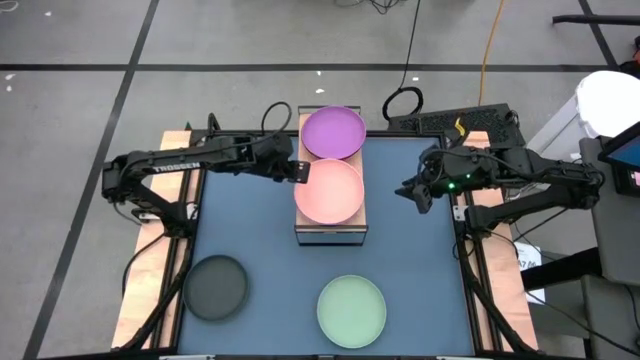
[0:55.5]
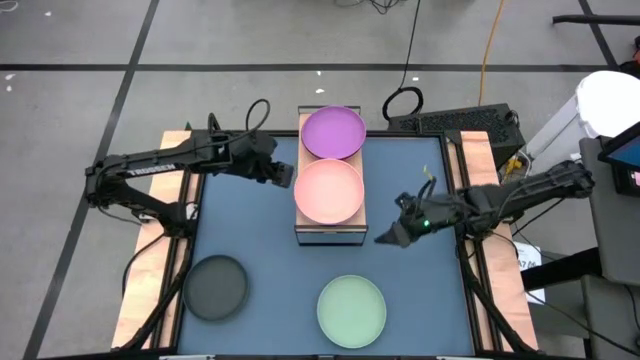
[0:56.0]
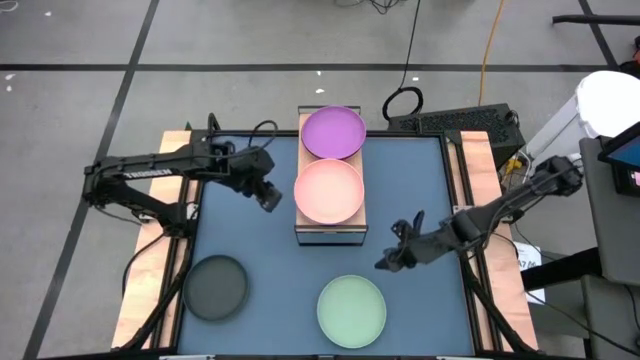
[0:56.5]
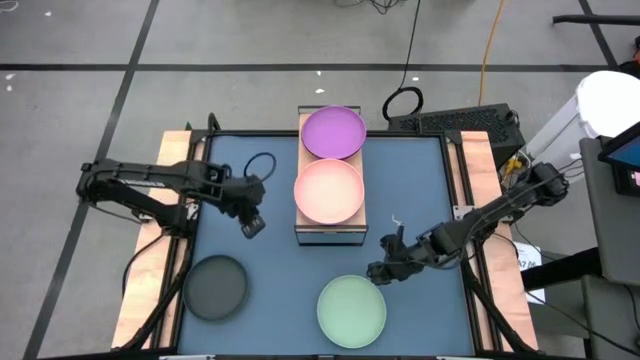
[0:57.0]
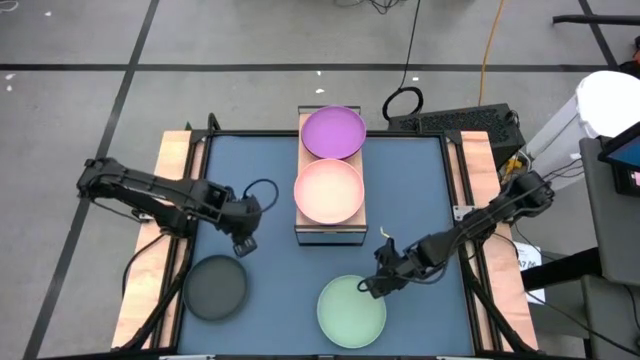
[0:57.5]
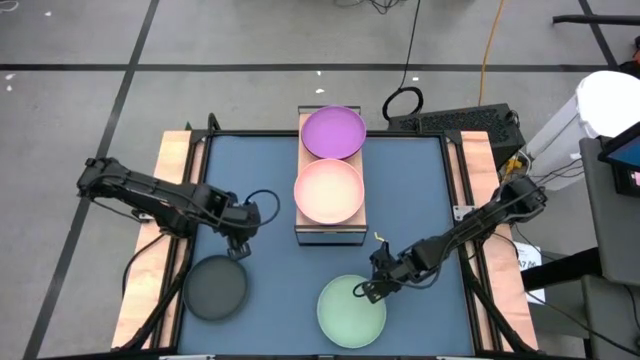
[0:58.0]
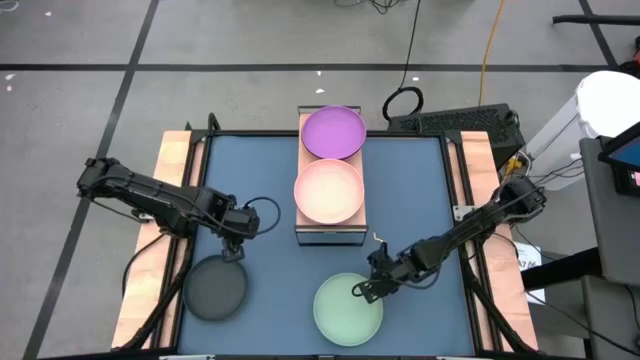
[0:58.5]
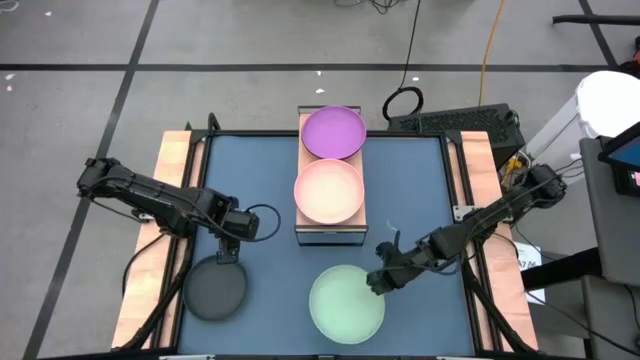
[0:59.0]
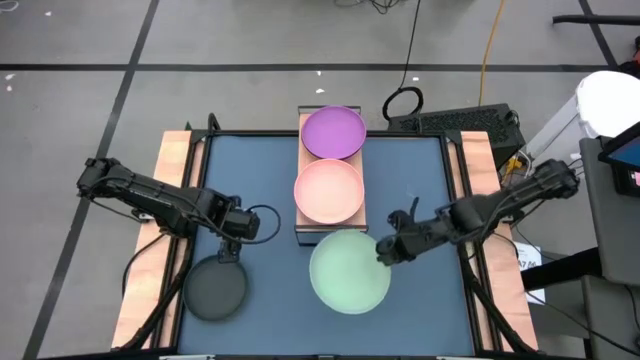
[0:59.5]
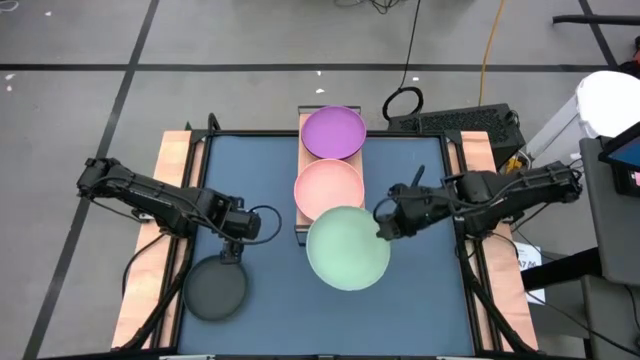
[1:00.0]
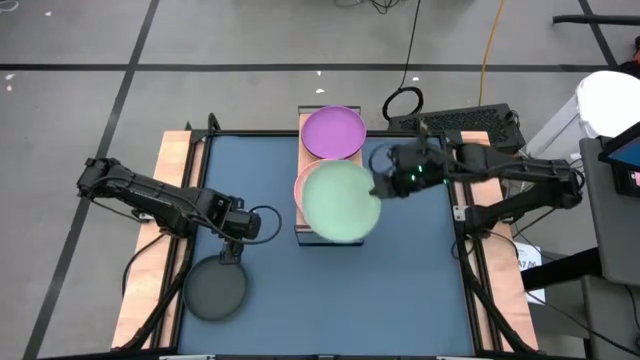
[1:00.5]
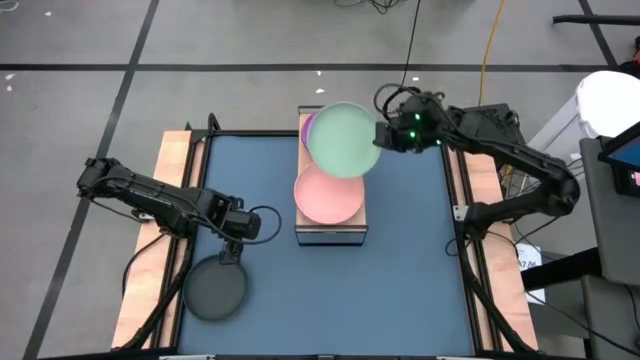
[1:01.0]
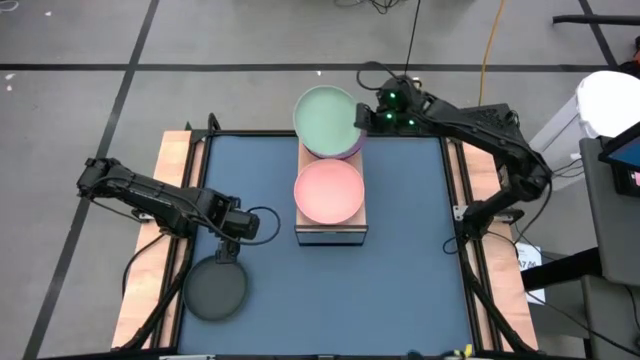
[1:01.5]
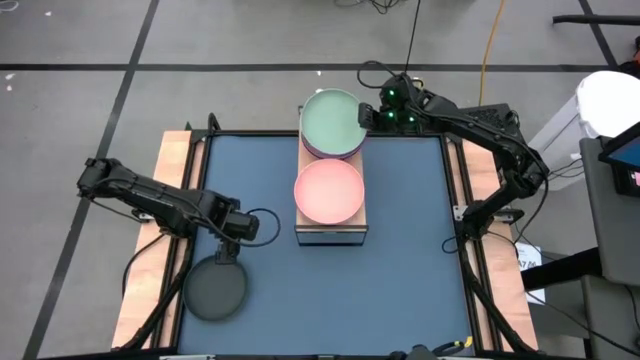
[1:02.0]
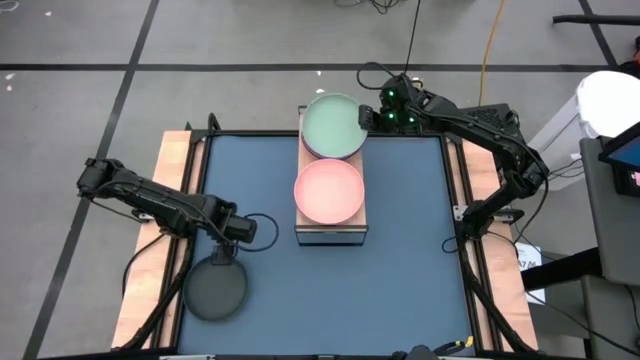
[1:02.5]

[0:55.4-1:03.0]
Task: Place and stack plates onto a shelf
Stack the green plate on top of the purple plate on the shelf

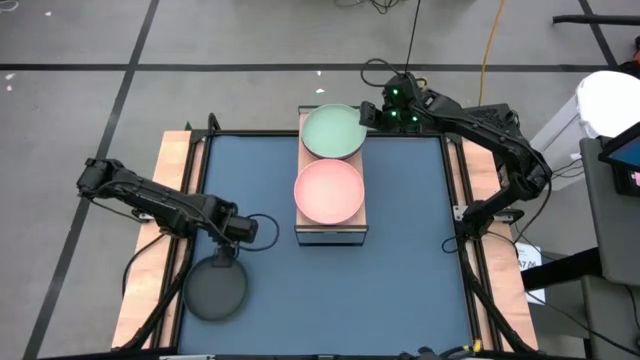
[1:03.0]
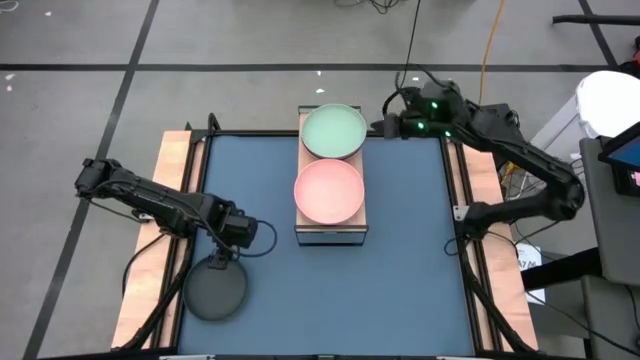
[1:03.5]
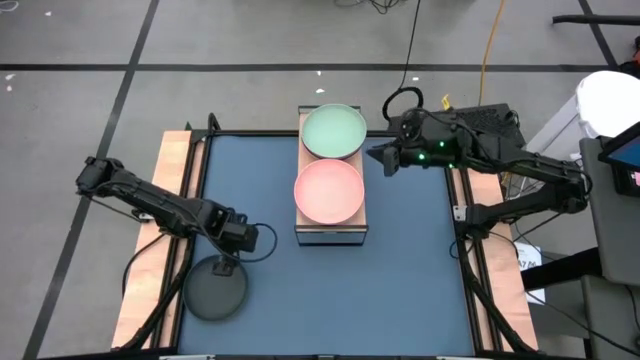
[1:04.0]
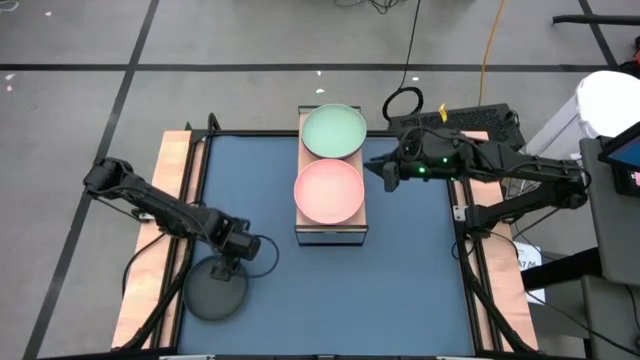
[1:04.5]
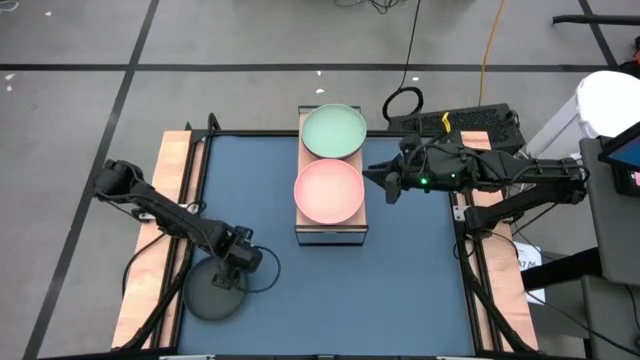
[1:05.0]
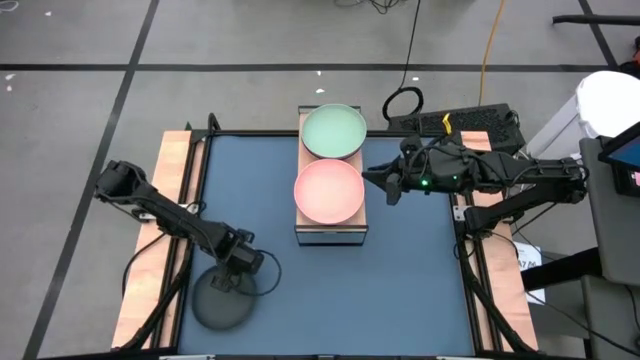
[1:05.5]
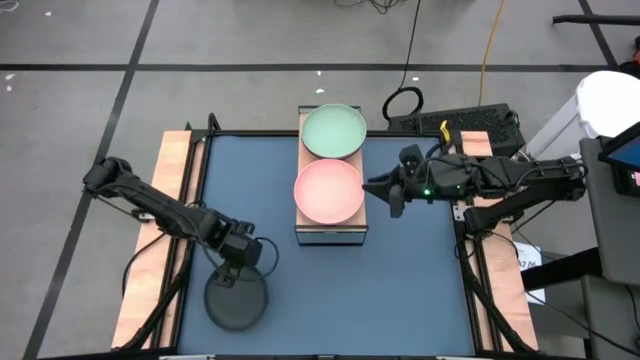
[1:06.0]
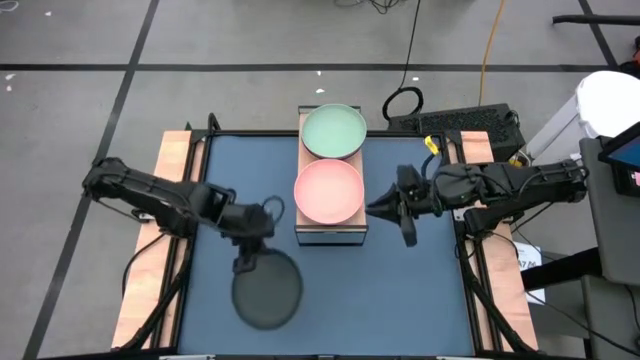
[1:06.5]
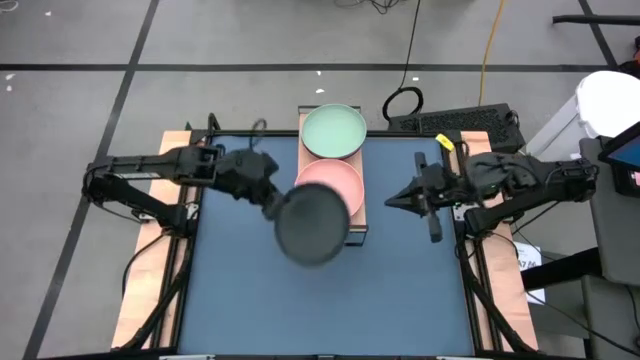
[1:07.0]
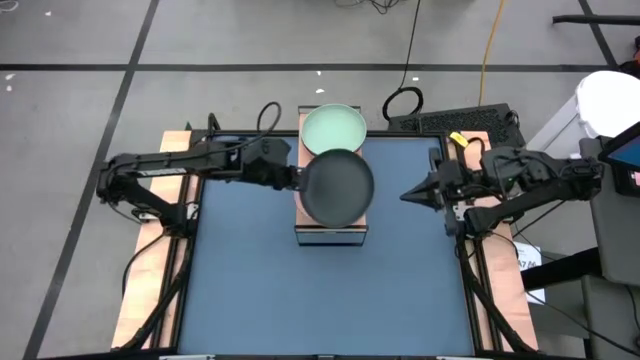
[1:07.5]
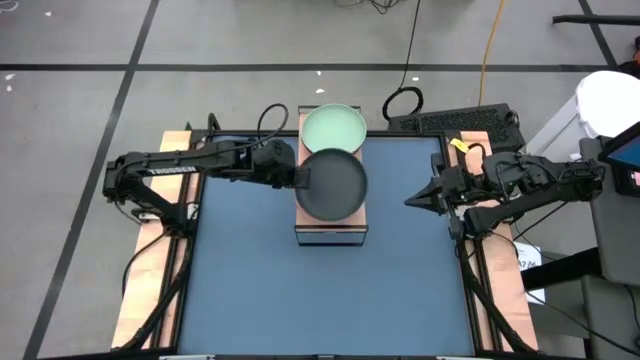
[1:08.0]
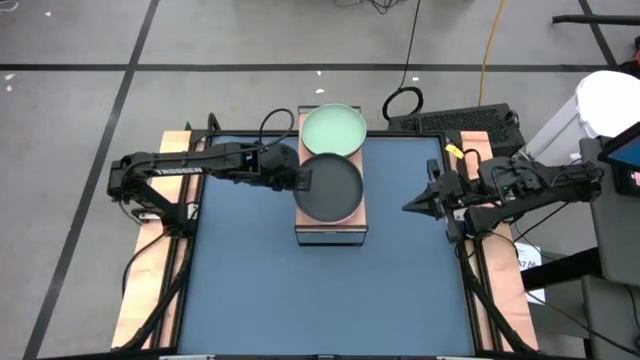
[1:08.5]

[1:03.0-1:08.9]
Stack the black plate on top of the orange plate on the shelf

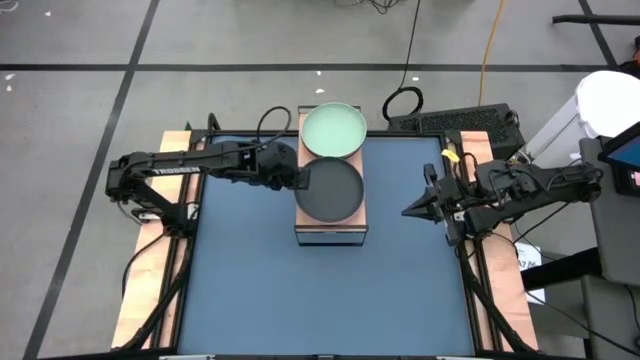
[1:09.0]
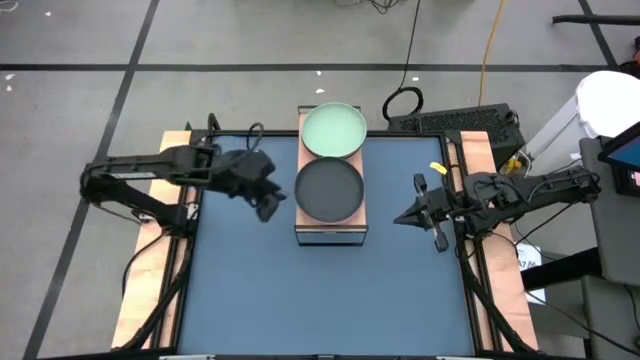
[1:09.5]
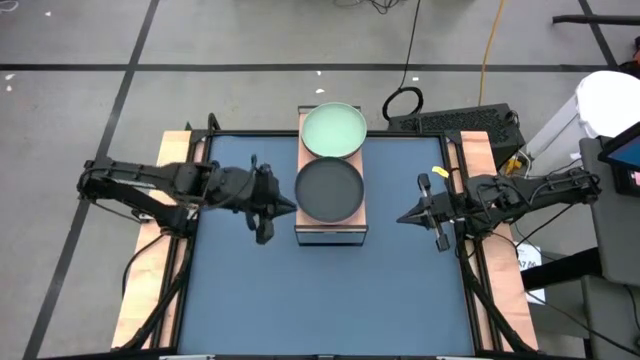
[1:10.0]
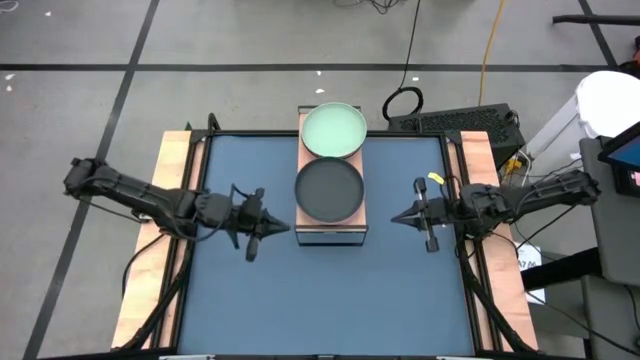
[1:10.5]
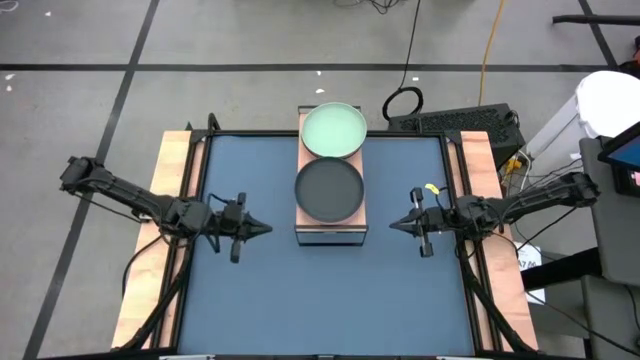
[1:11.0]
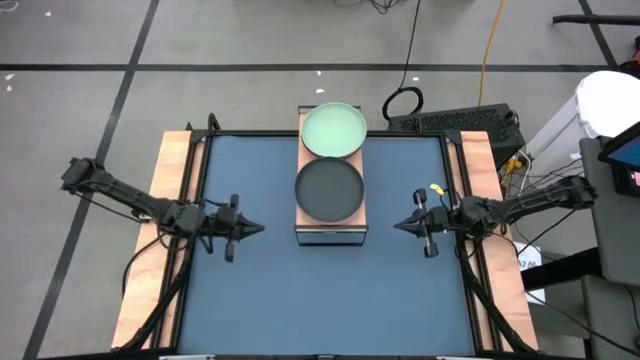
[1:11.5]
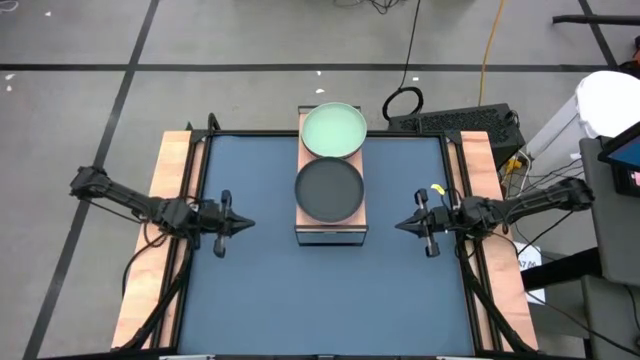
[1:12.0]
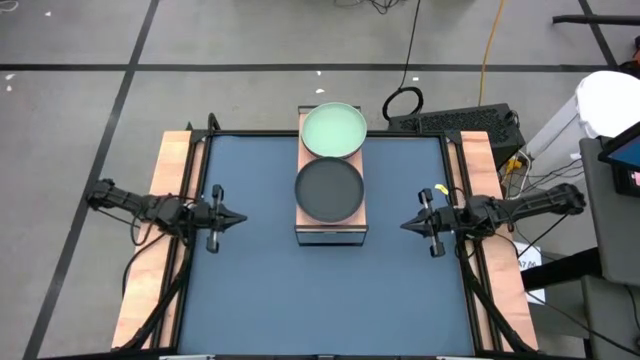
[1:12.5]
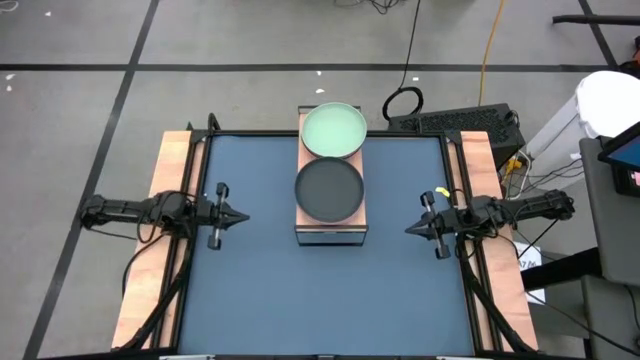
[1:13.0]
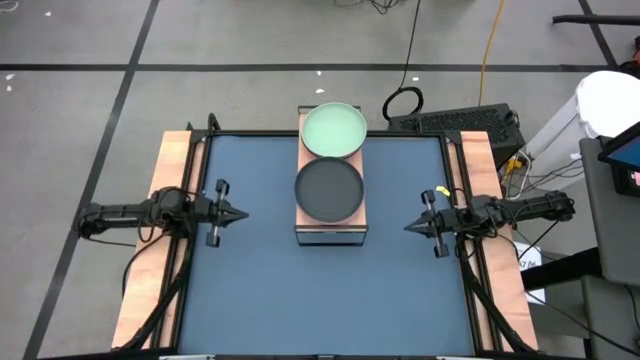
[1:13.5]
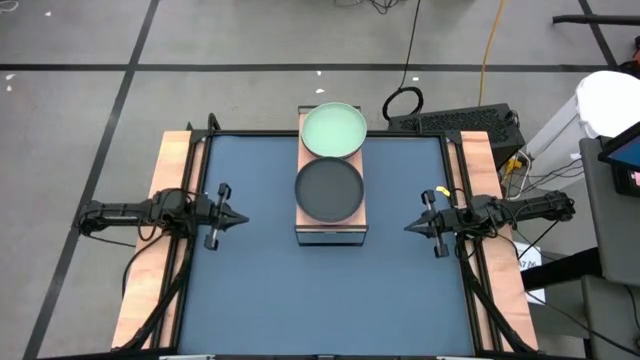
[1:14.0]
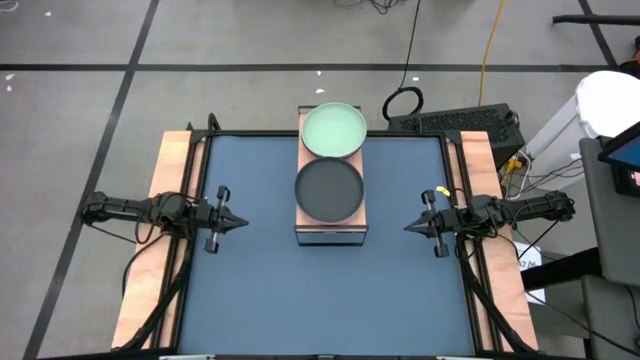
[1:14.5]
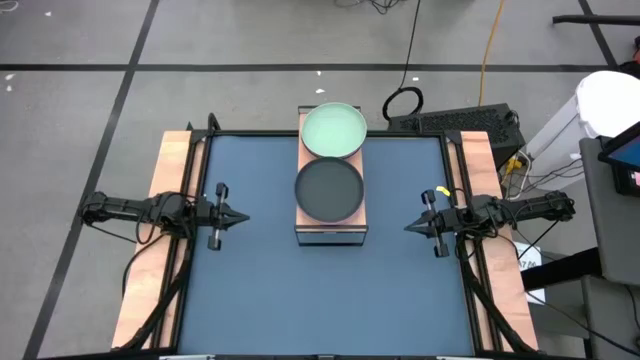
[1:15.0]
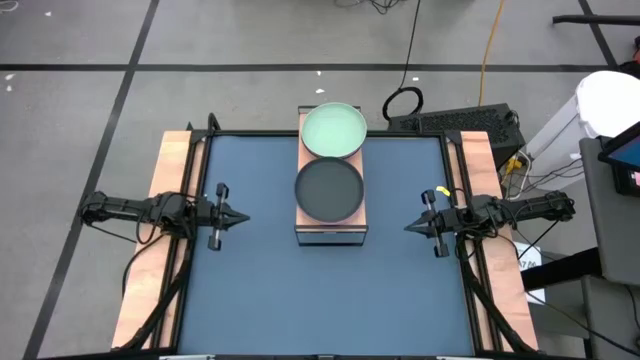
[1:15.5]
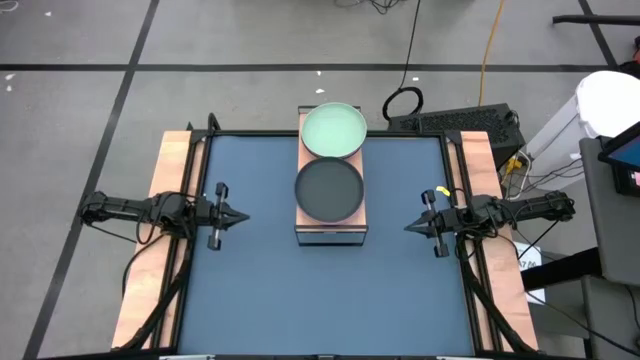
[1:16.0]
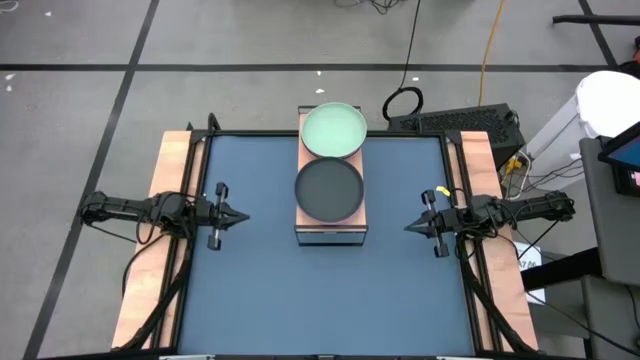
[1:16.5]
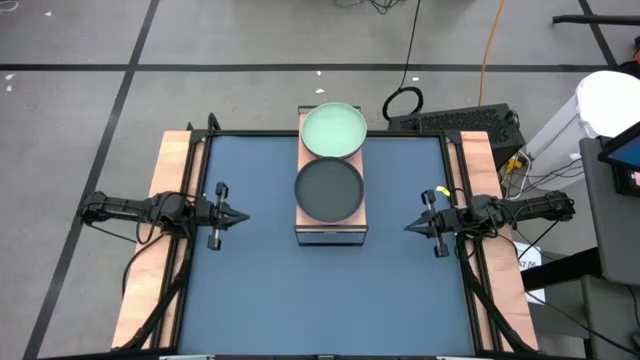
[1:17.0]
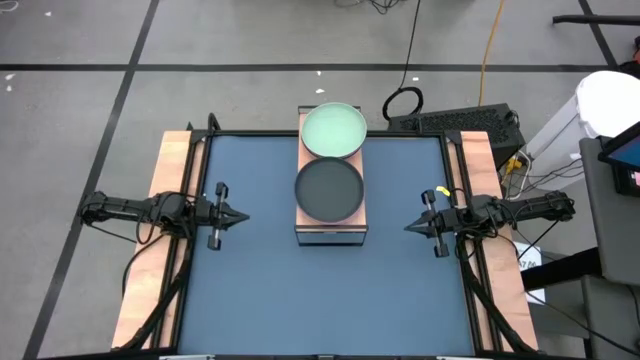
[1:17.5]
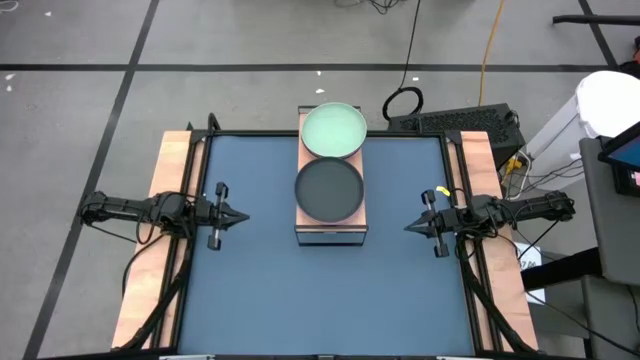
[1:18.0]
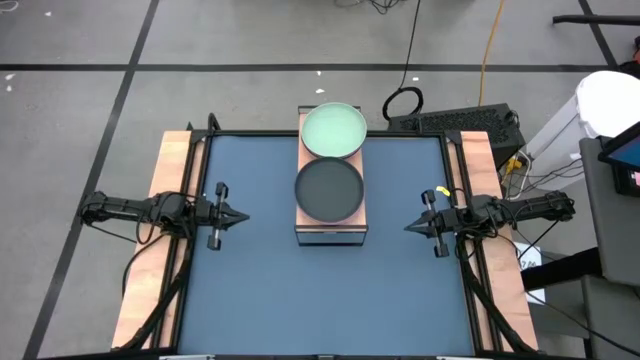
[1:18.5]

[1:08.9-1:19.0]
Return to Home Position
